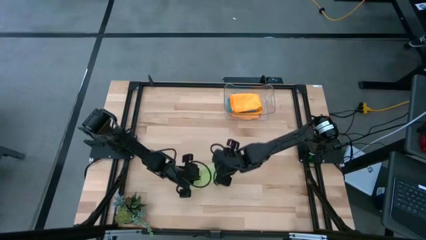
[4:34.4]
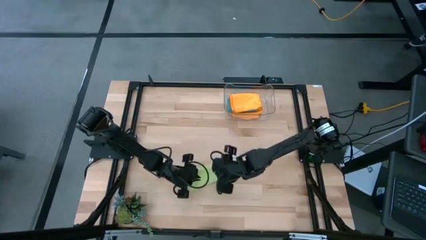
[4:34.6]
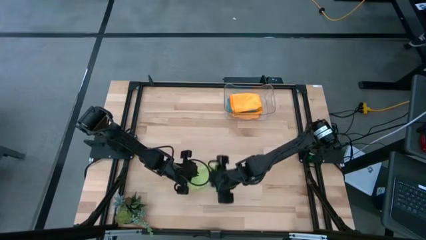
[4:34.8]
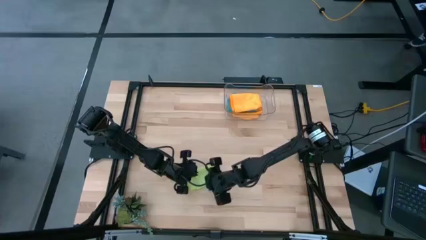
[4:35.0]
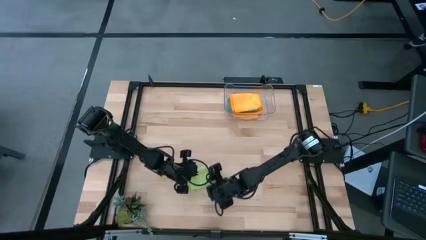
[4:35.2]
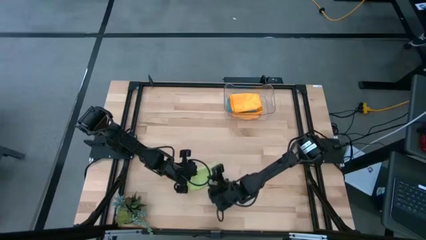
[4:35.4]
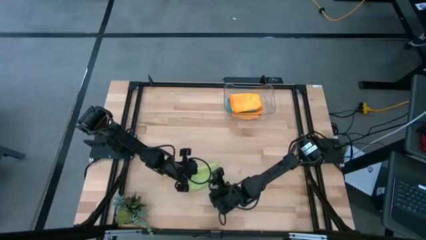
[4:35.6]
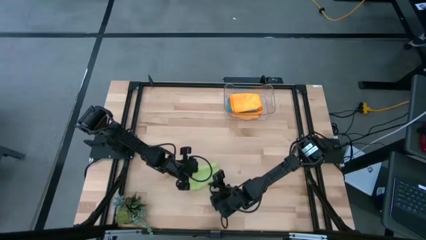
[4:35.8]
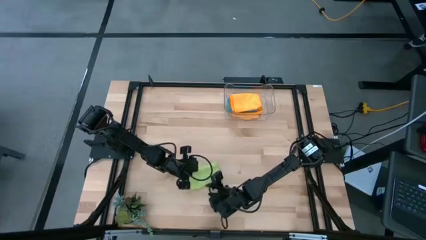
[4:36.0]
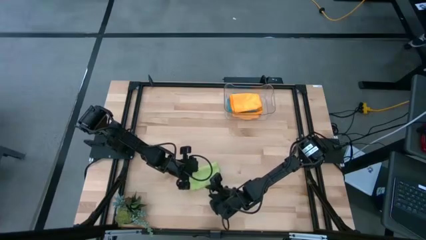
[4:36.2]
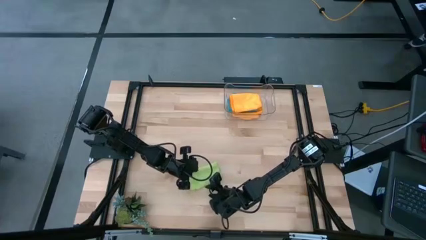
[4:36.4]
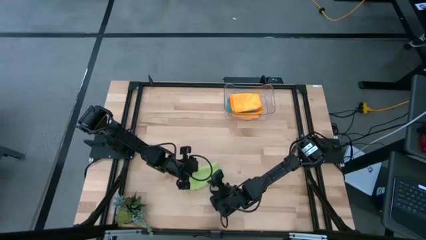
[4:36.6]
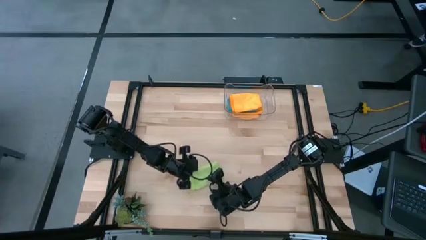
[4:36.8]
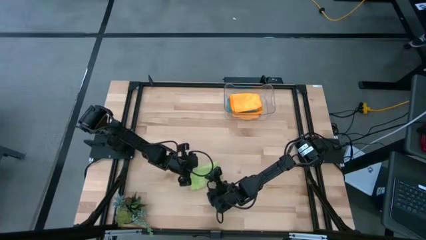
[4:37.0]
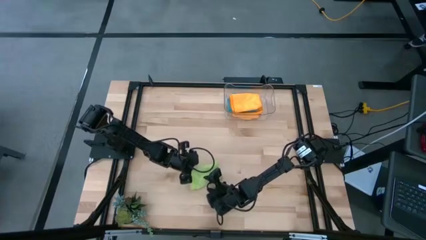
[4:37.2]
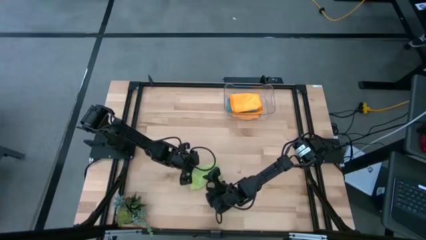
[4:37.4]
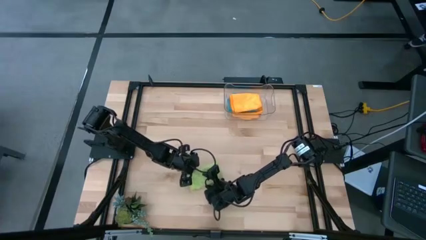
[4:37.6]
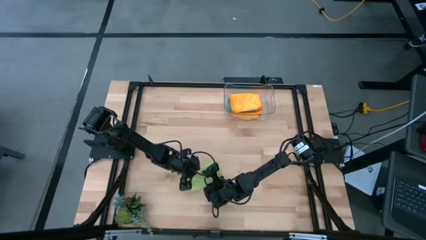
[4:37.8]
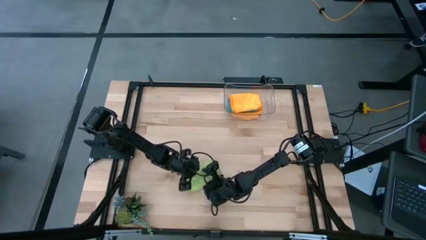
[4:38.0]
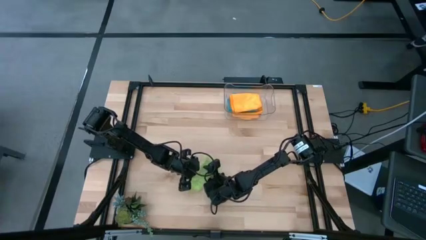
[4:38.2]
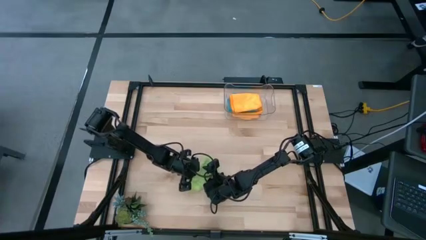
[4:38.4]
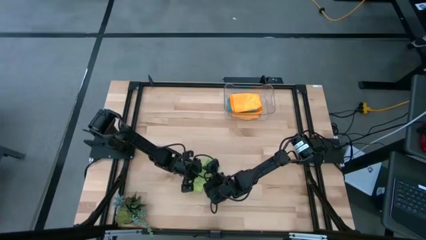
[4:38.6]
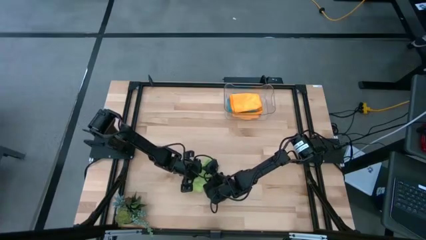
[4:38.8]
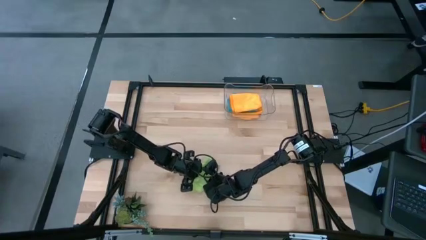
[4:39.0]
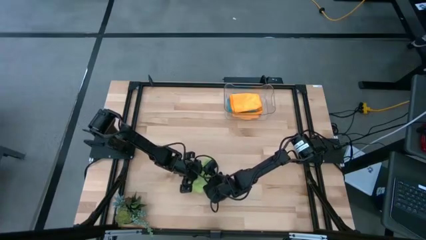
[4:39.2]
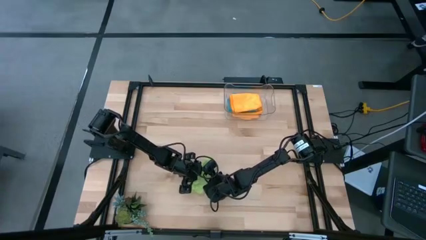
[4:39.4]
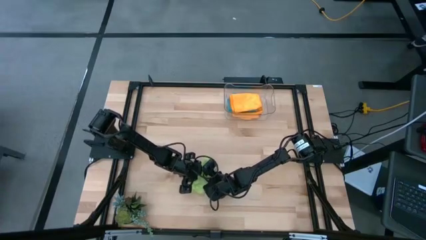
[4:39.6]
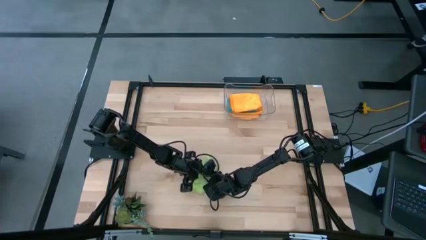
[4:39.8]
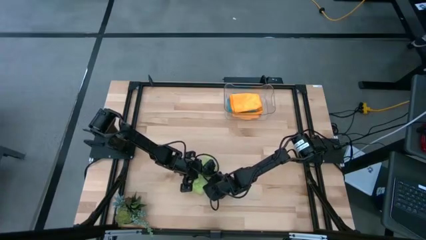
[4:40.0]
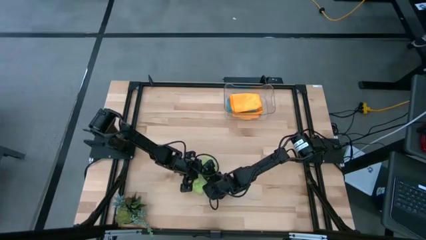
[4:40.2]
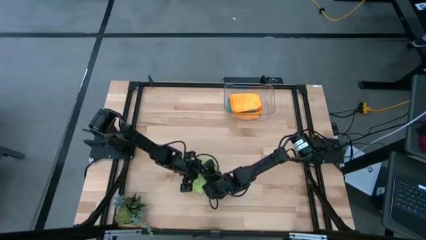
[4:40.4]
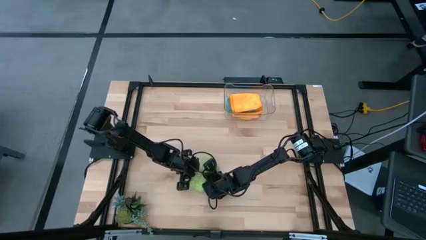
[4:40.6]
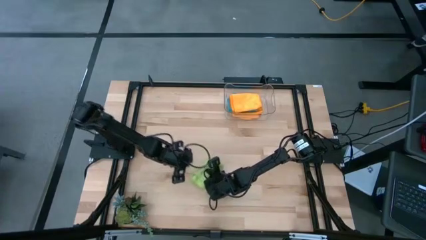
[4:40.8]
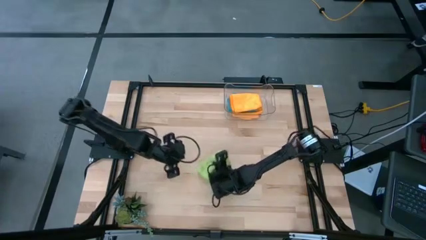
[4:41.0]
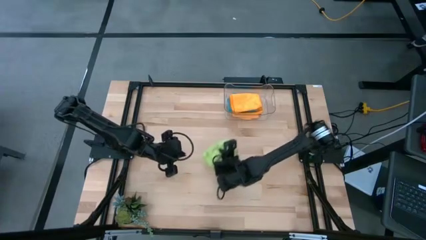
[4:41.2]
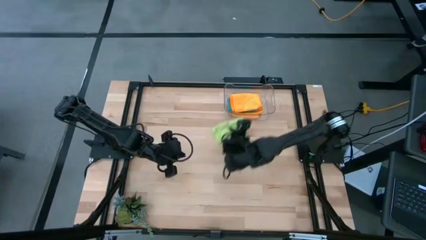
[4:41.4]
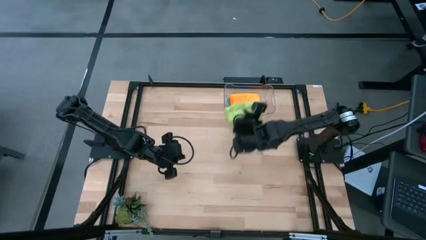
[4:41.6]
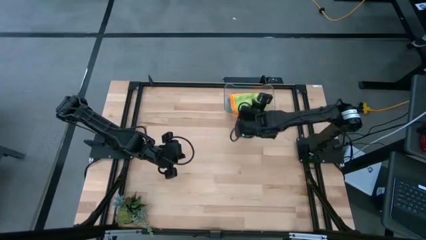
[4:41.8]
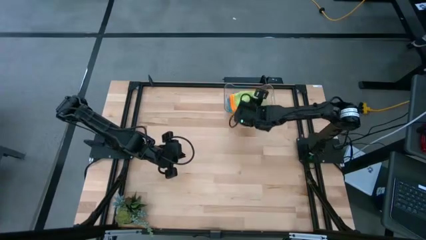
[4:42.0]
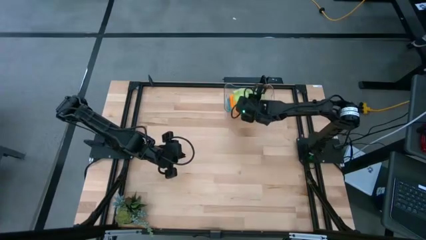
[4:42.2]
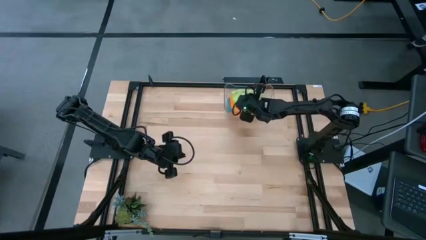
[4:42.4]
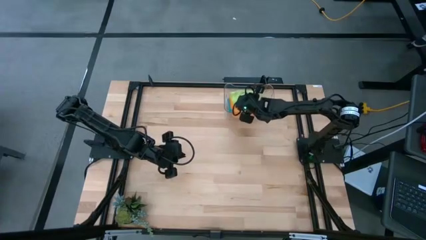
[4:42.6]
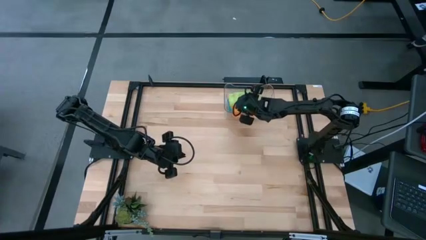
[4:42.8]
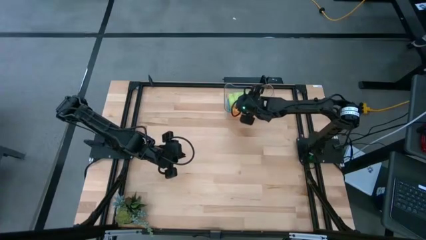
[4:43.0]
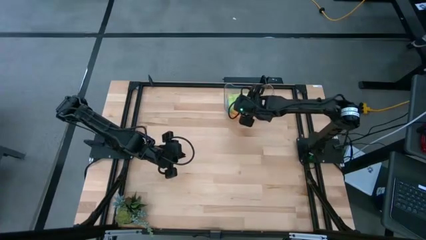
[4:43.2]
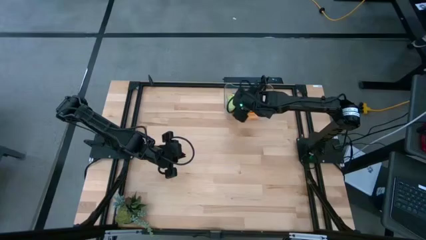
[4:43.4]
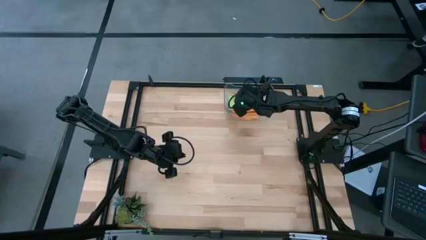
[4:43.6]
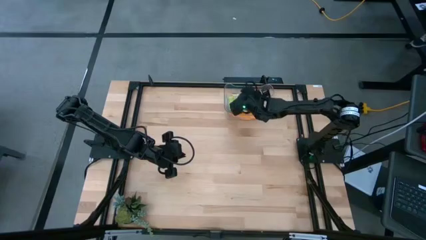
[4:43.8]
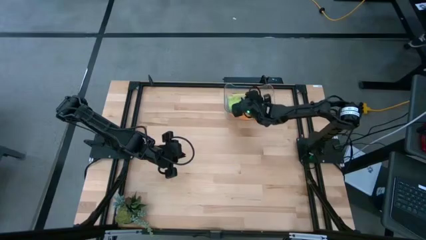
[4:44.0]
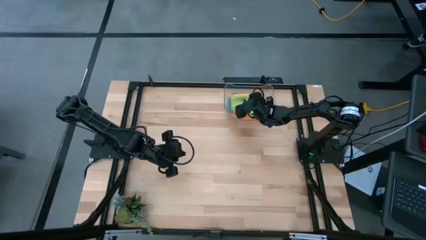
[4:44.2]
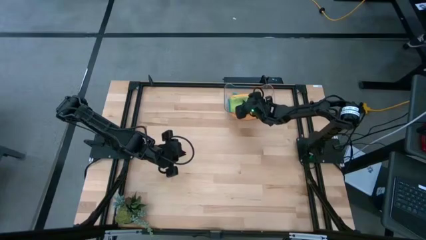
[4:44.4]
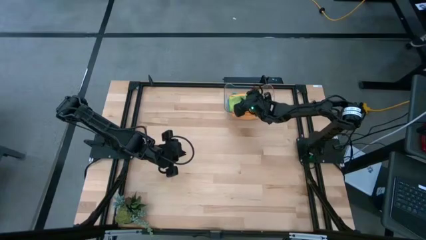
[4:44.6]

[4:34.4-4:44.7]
Task: Fold microfiber towels
Stack the folded green microfiber towel on top of the orange microfiber towel in the transparent bin

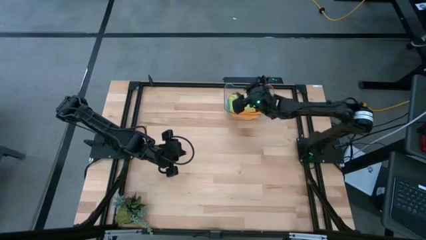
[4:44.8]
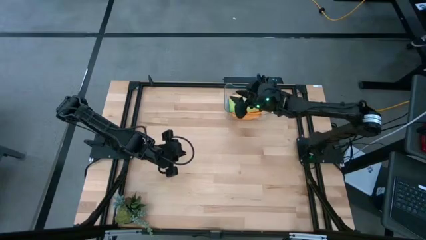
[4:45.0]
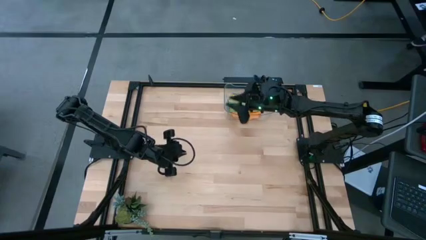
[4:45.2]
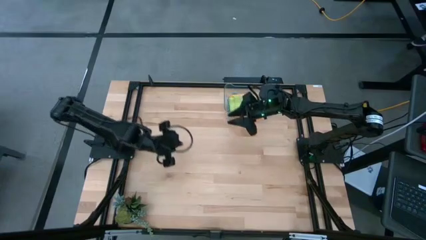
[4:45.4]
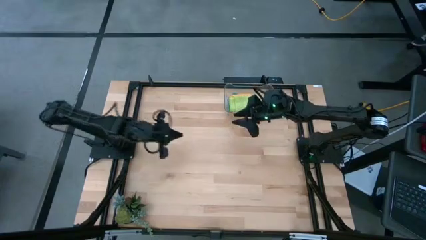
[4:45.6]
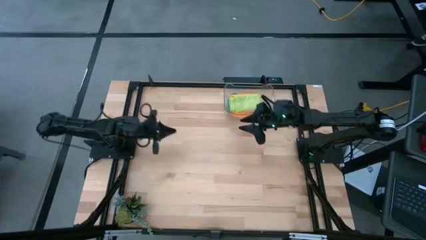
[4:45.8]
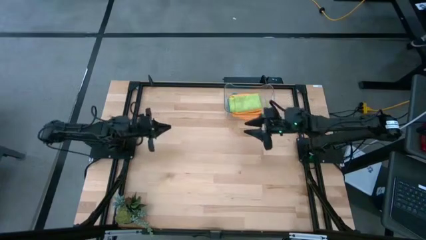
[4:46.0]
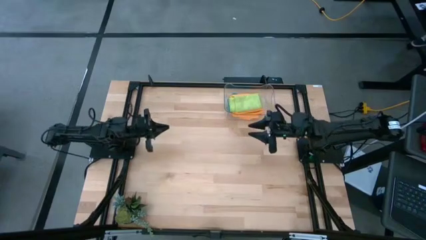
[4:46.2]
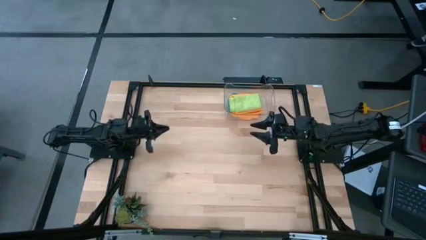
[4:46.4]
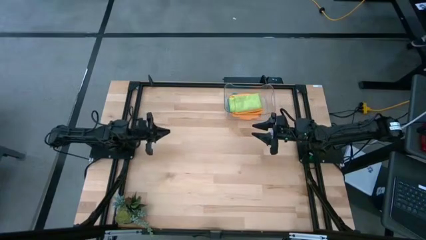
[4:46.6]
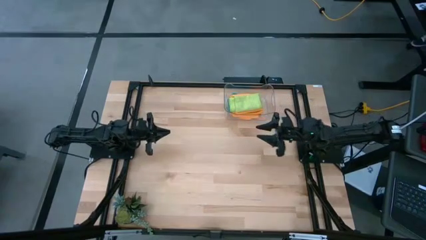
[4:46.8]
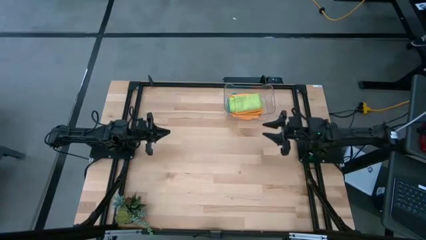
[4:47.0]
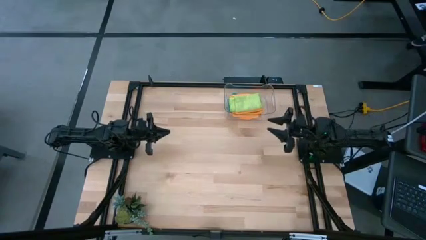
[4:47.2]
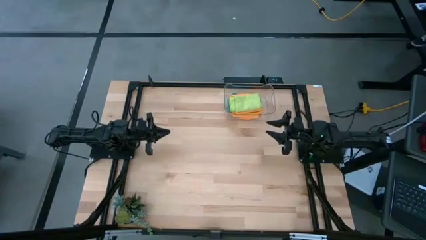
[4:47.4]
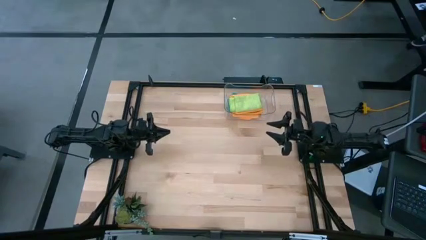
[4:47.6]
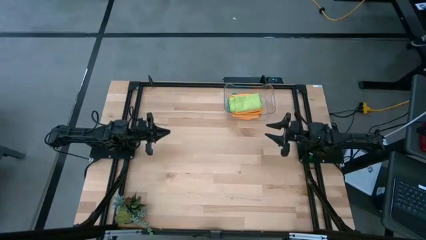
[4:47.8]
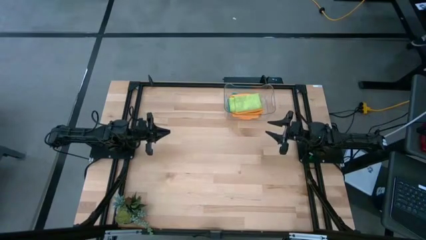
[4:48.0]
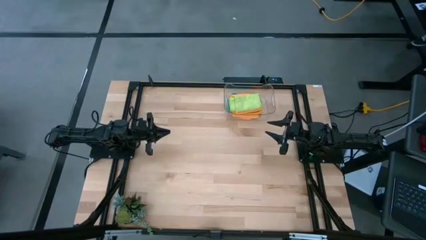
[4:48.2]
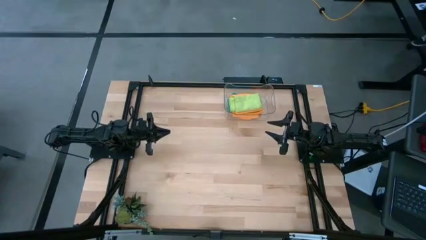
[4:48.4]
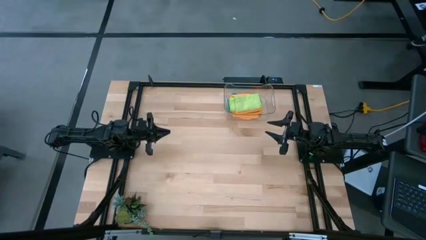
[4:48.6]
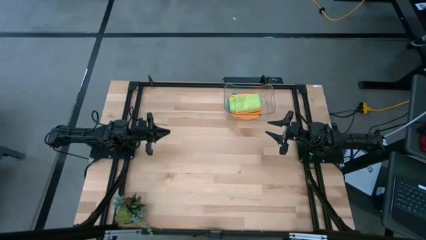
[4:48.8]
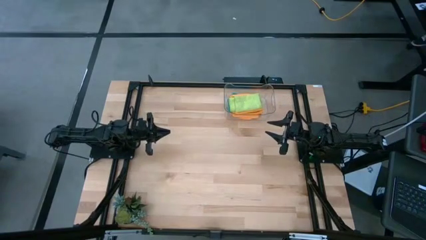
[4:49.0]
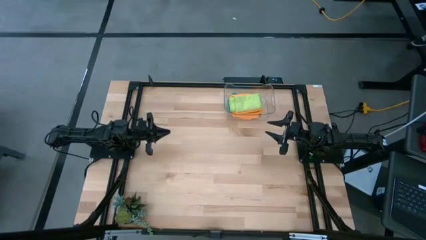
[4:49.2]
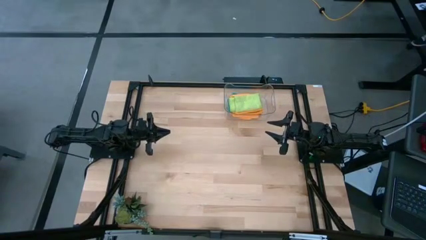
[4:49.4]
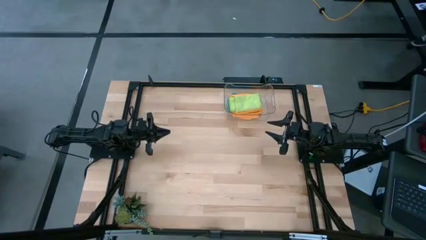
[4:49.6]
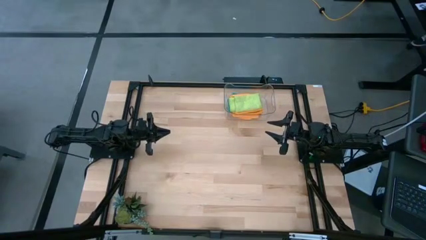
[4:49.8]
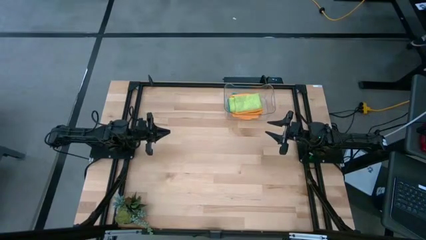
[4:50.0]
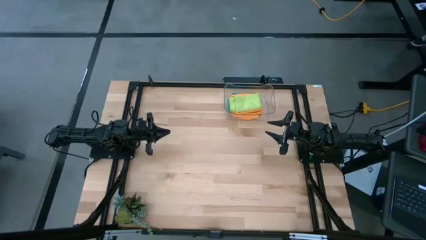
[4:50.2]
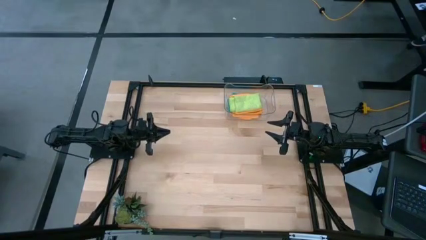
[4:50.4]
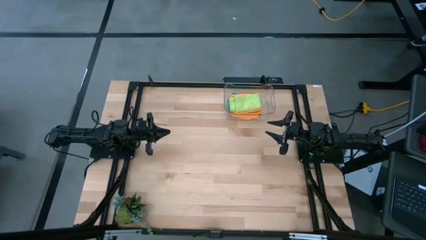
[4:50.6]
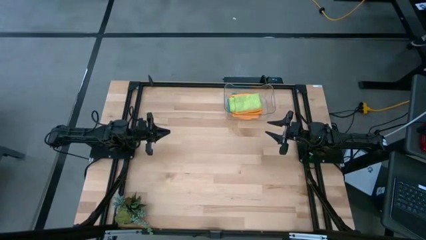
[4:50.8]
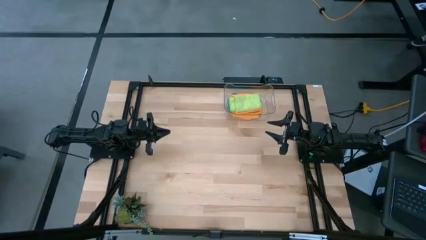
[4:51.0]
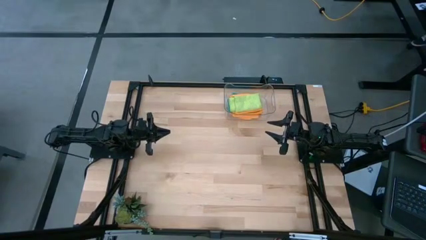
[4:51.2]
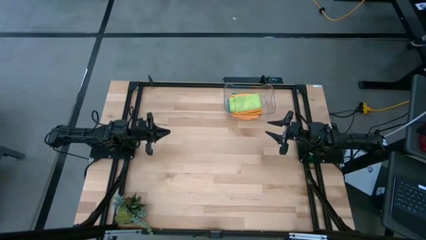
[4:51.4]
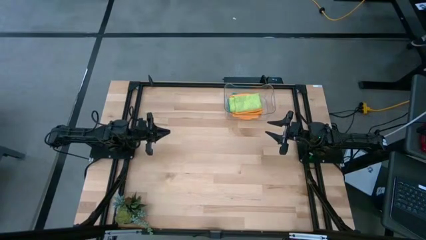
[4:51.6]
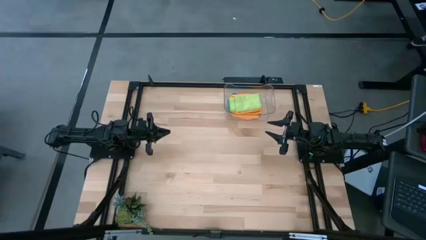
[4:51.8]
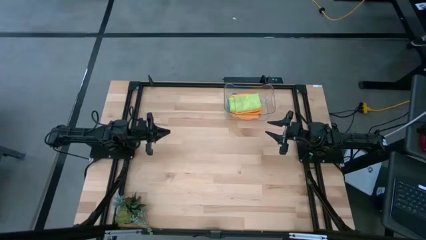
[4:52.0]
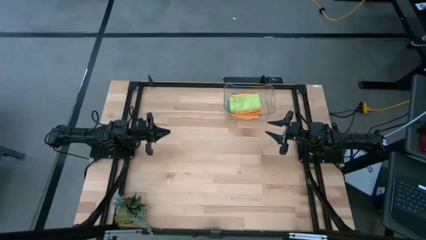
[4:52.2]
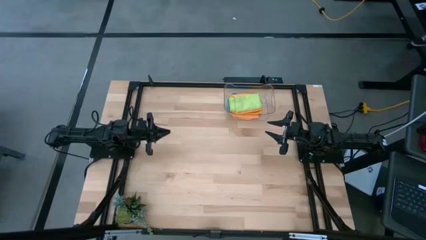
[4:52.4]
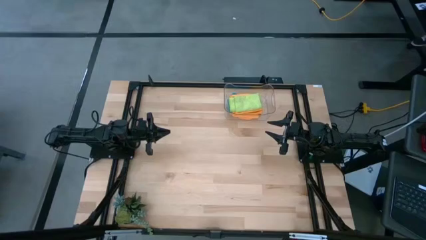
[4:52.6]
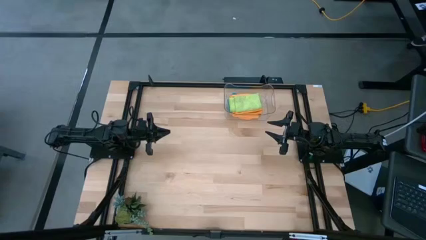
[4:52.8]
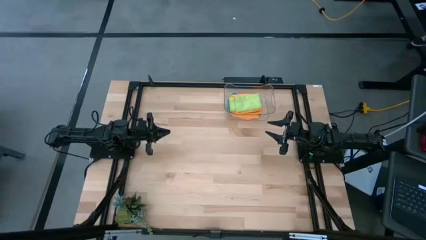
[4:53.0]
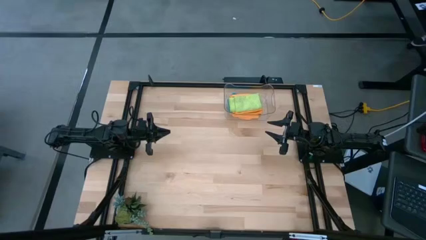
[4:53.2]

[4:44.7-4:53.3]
Return to Home Position
